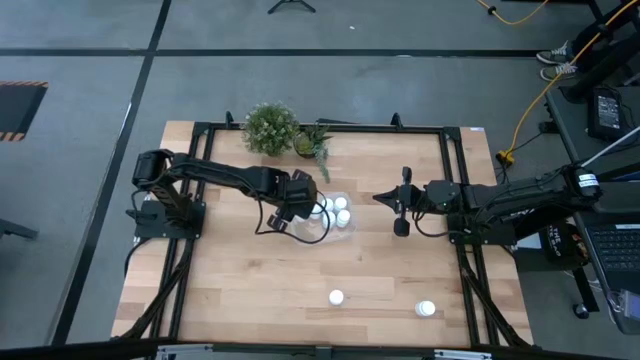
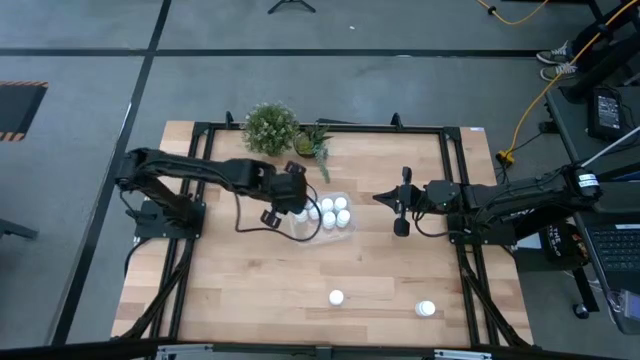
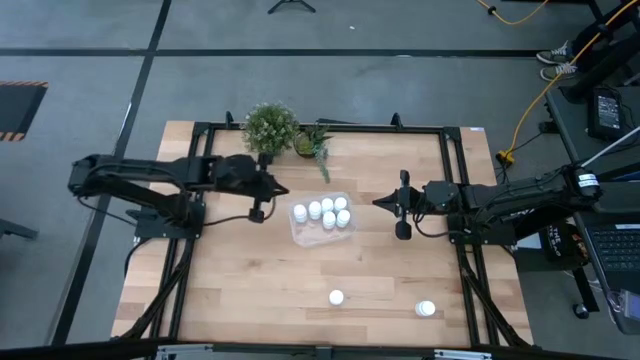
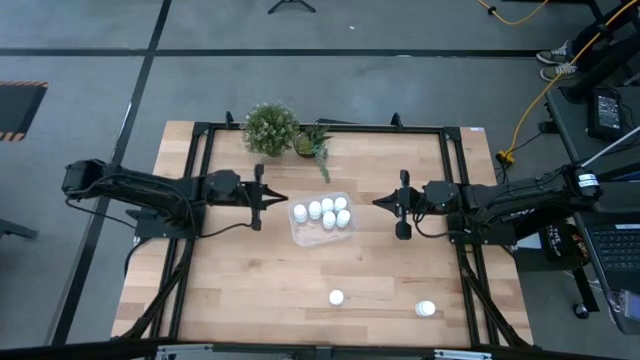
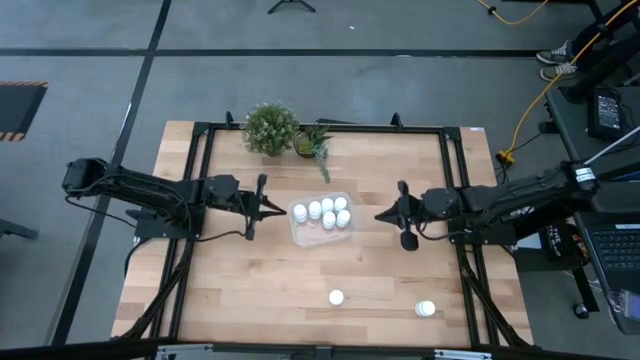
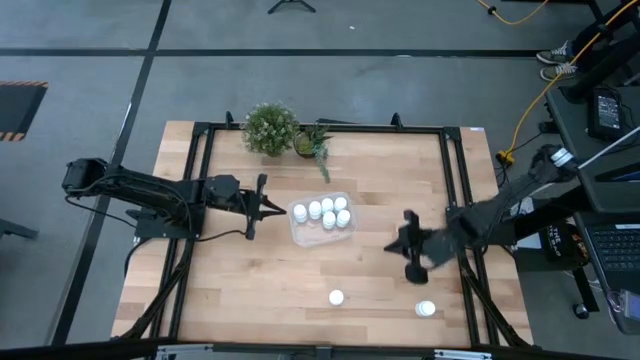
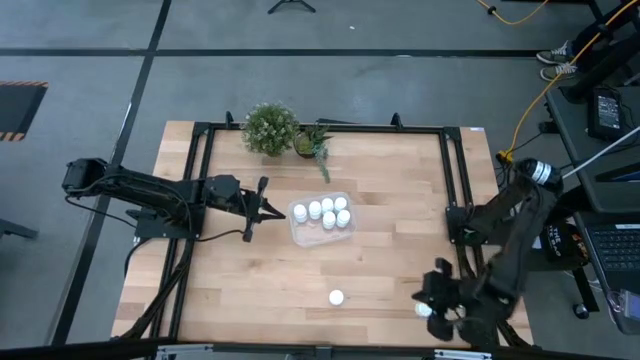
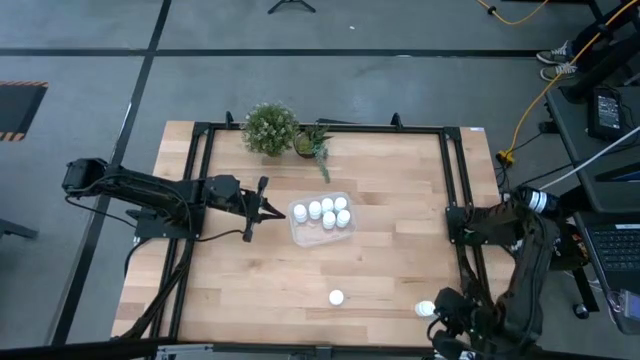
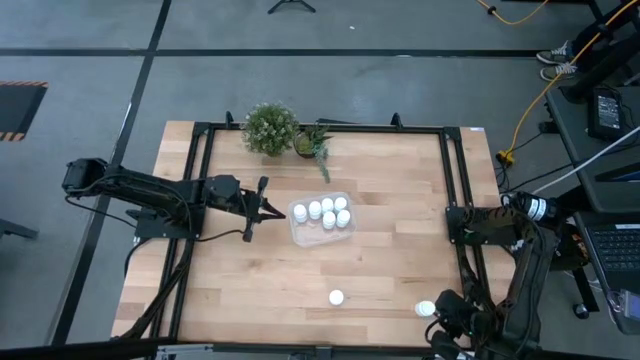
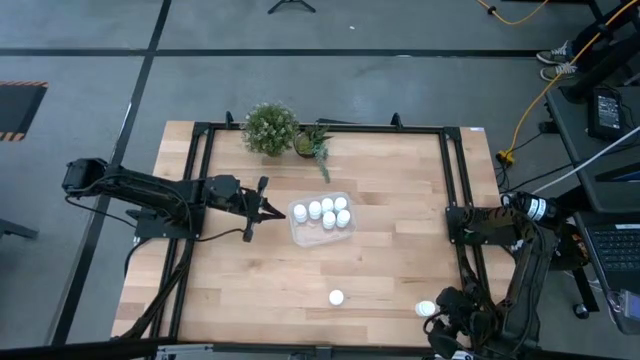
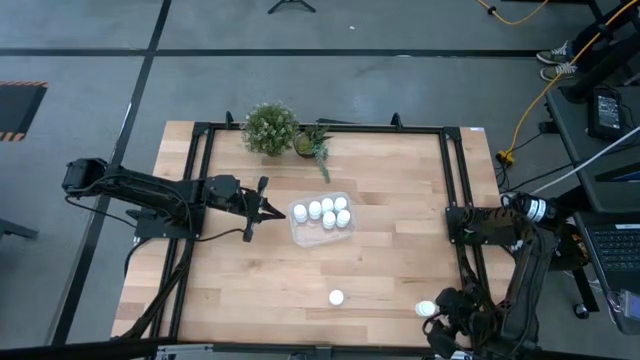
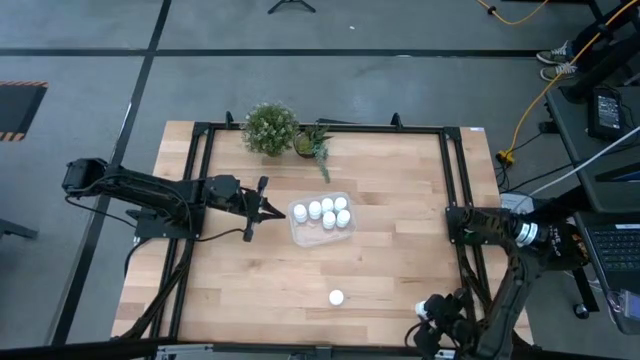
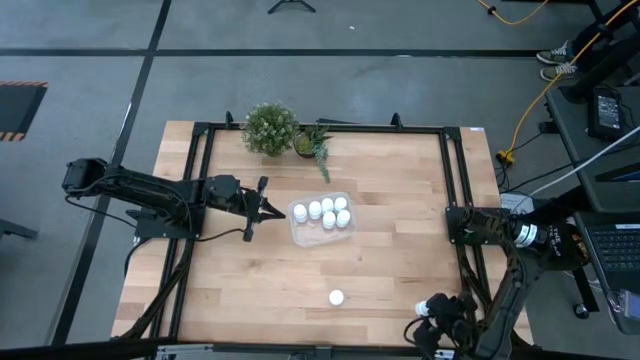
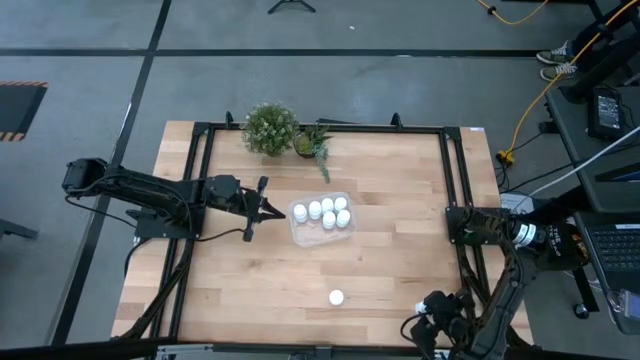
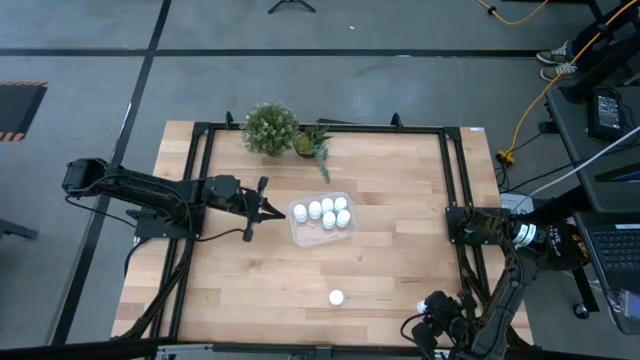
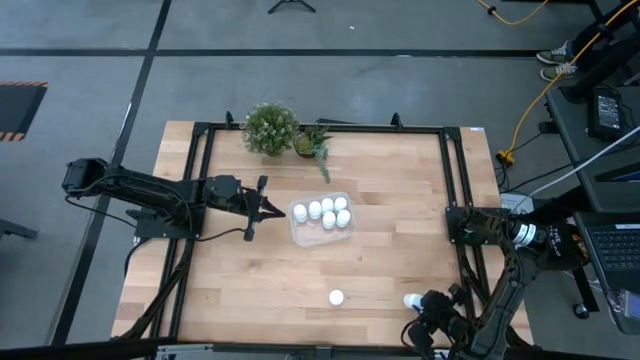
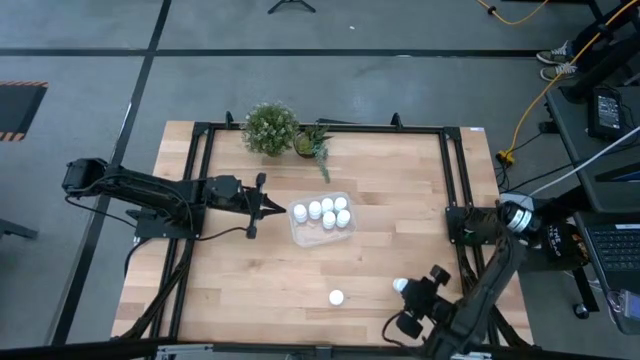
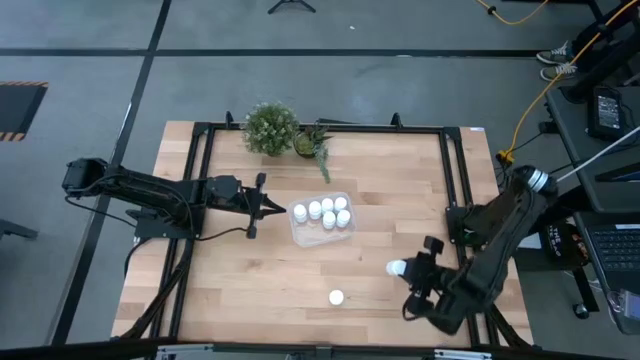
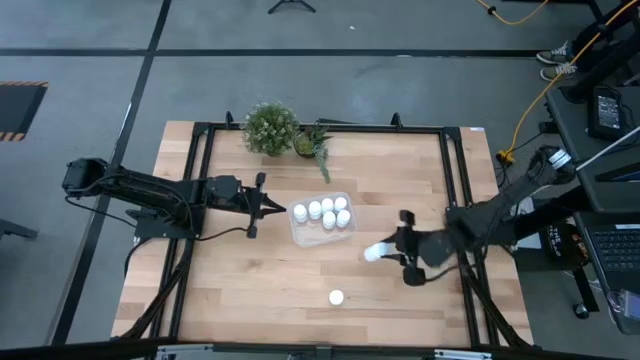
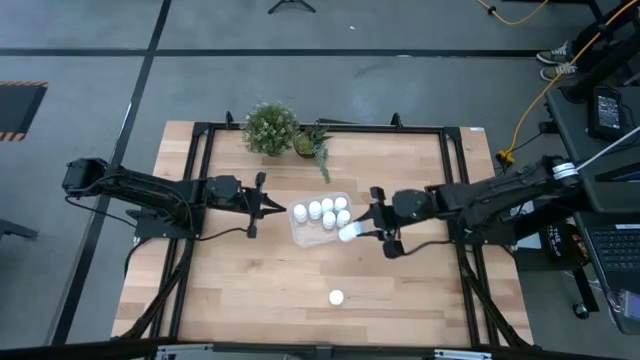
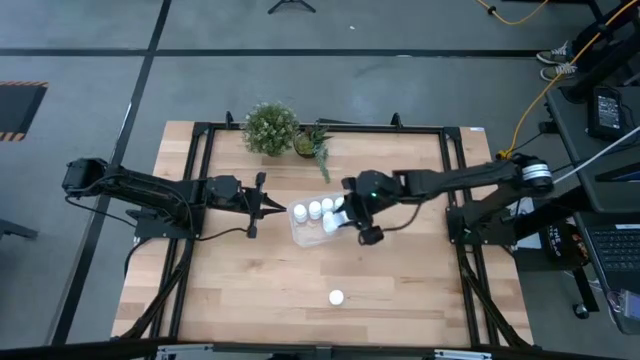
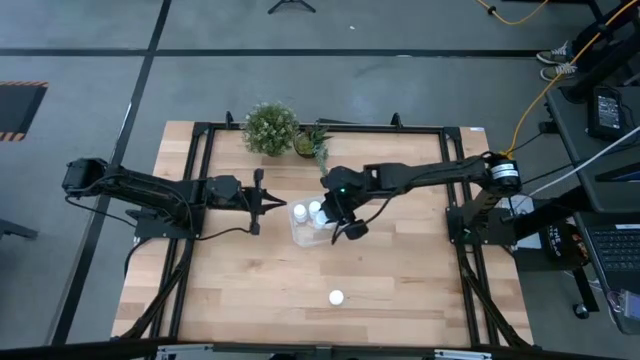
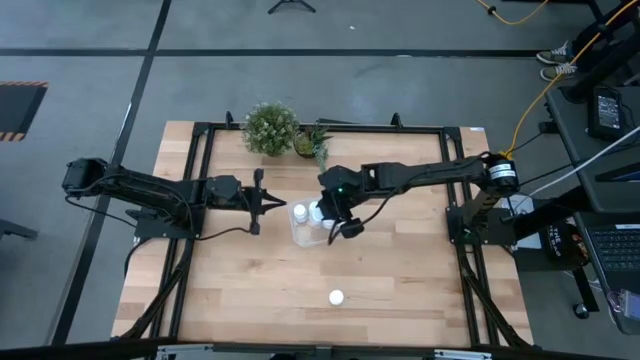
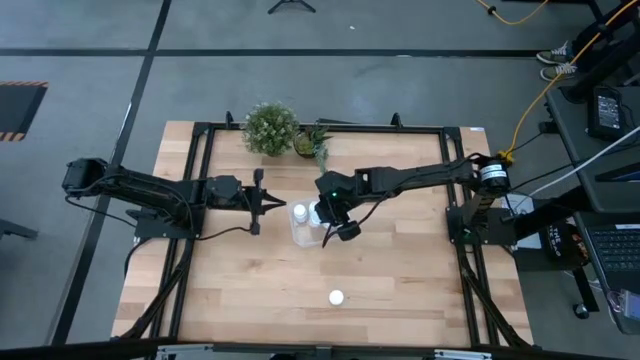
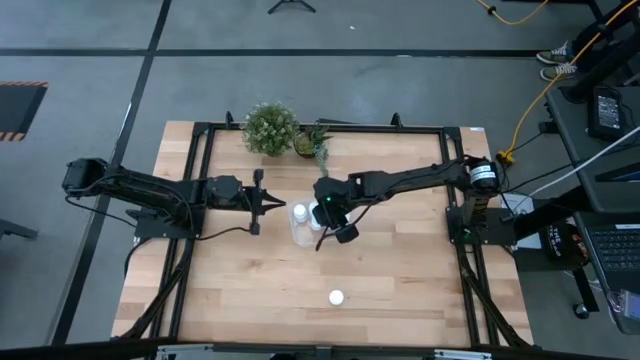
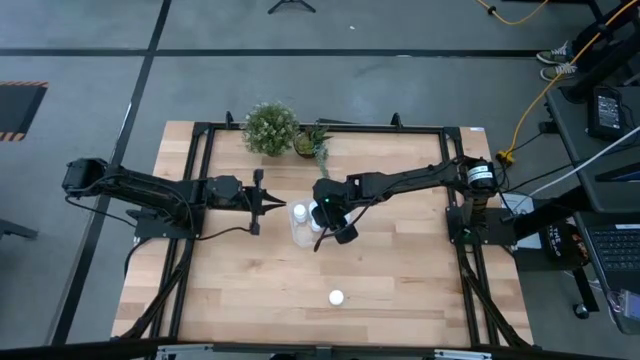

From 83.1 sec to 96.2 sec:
Task: Pick and place pill bottles into a basket
Put the white pill bottle into the transparent bin

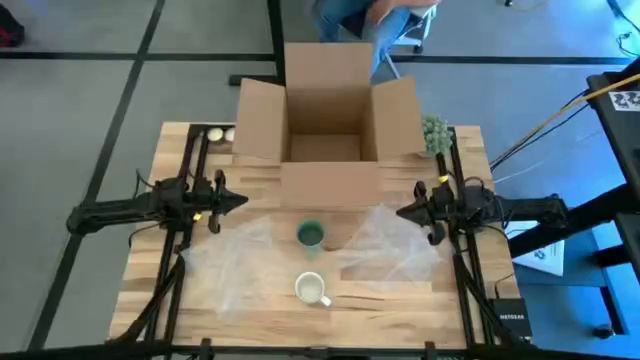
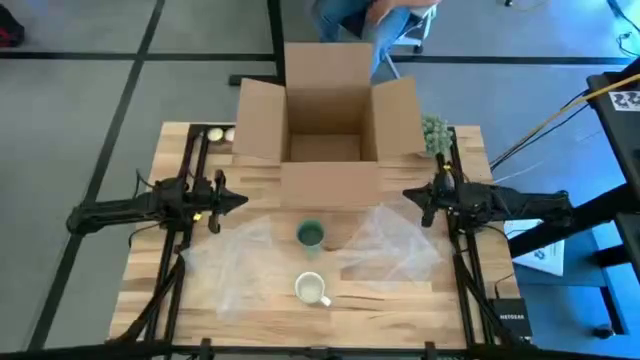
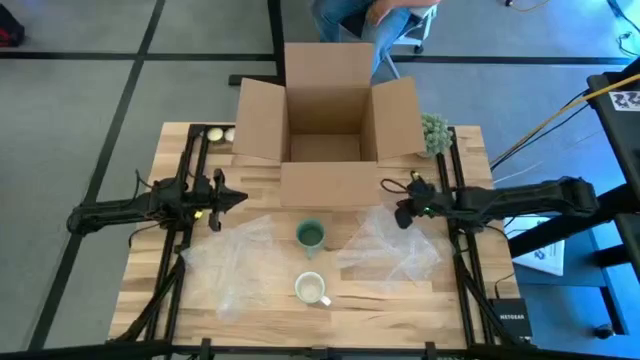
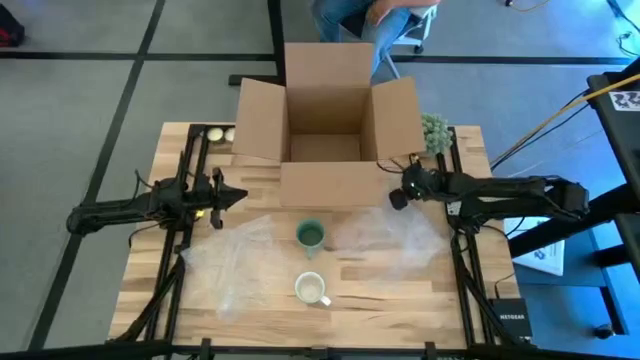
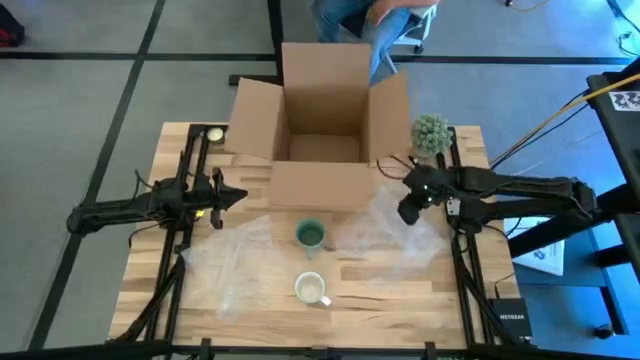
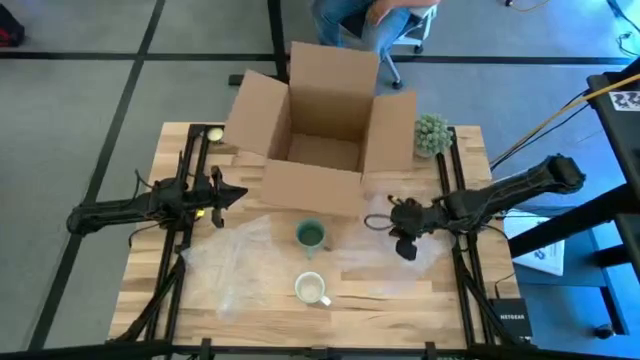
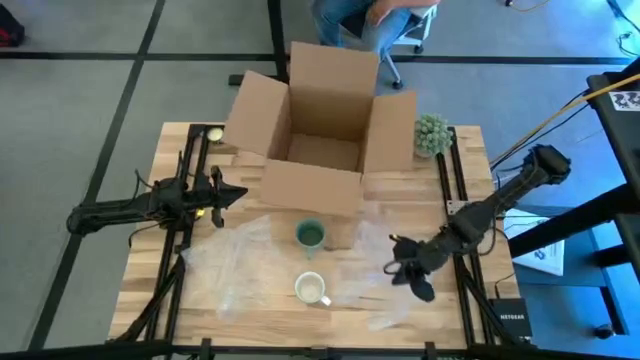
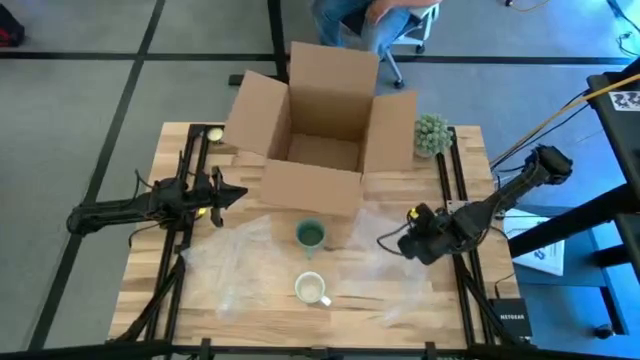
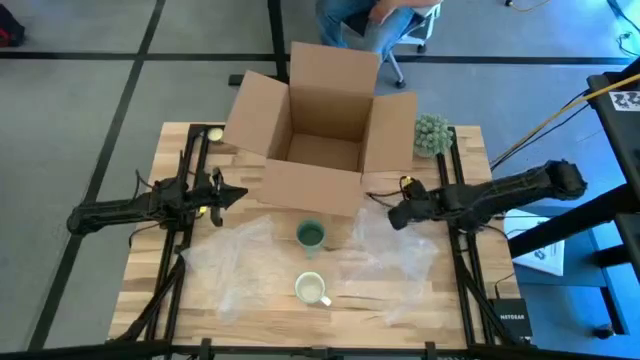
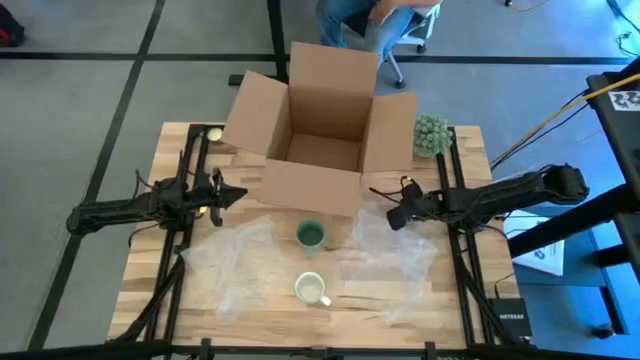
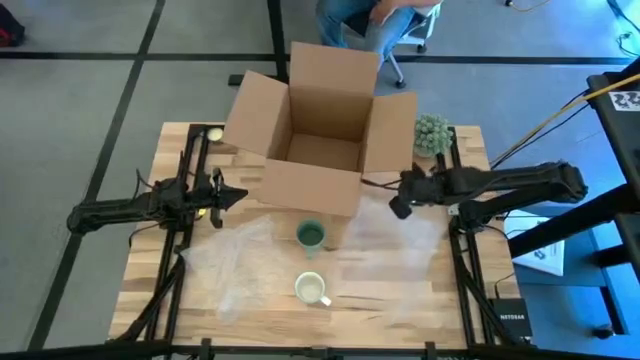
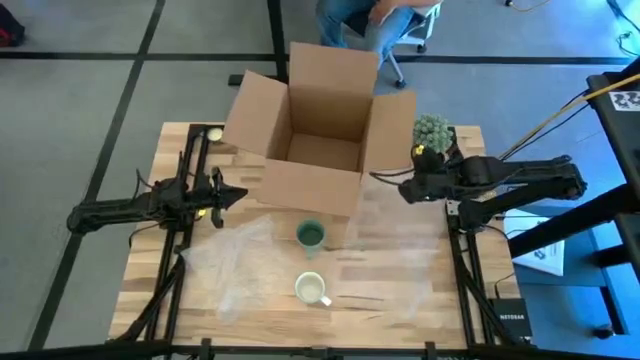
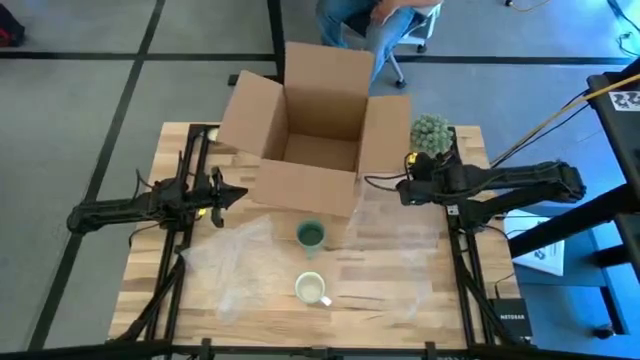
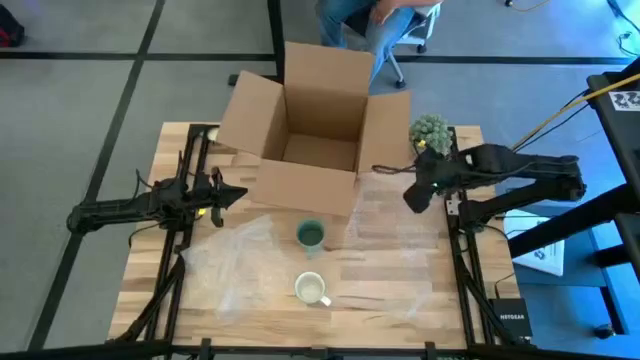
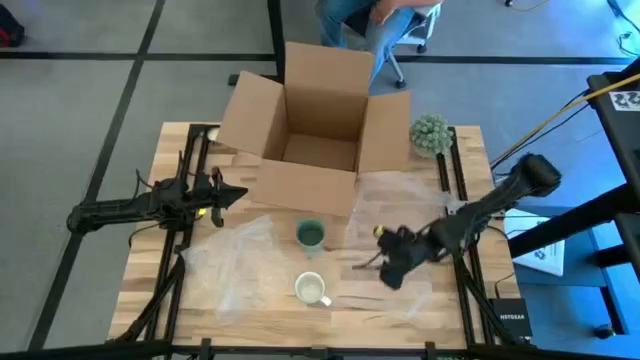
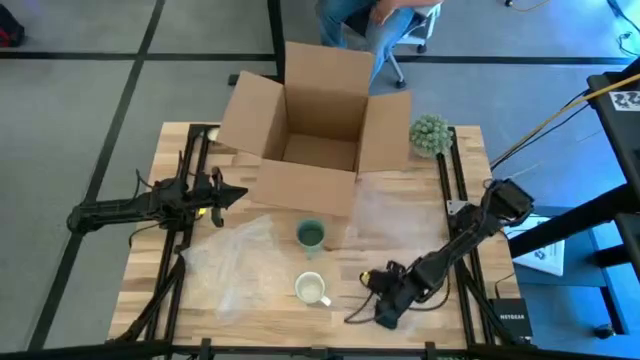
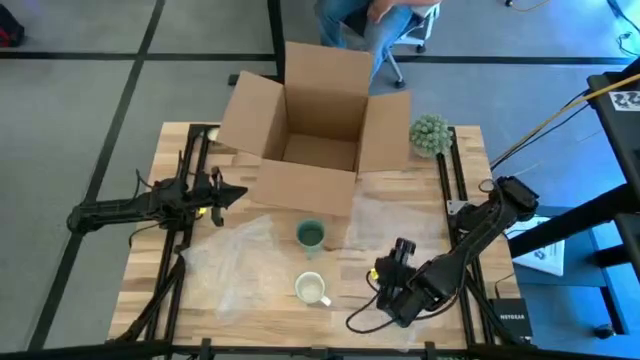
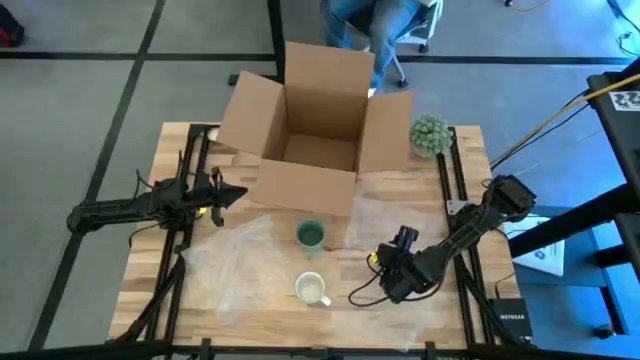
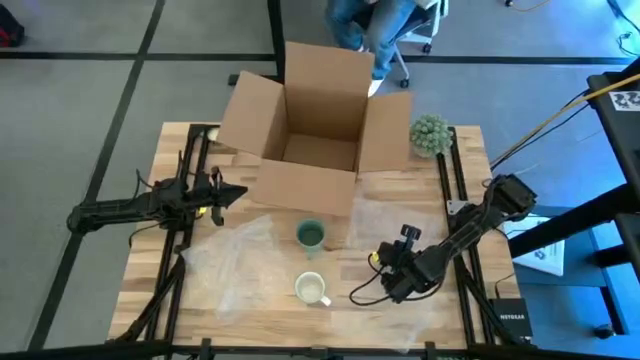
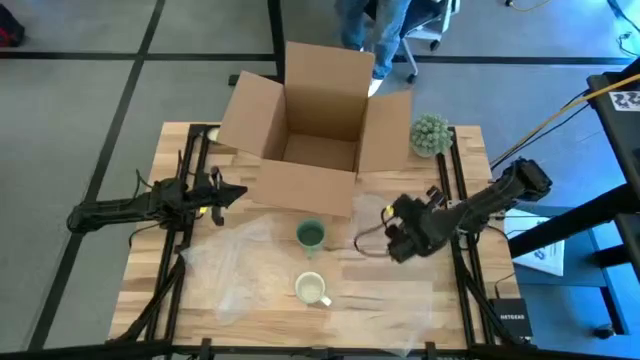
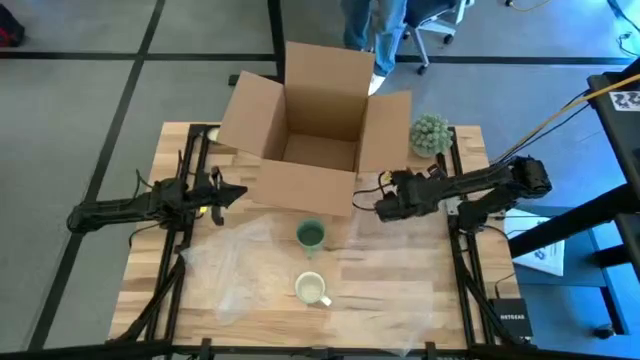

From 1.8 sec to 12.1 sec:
Task: wrap mug
Prepare the right transparent bubble wrap
